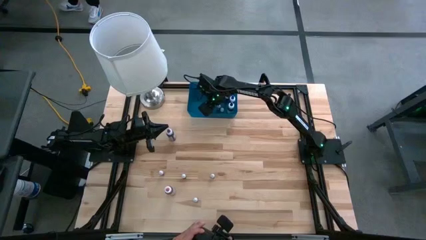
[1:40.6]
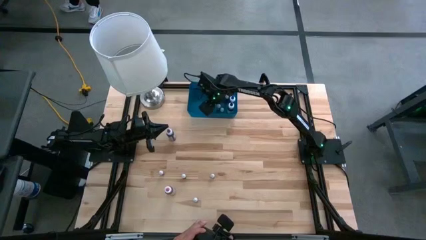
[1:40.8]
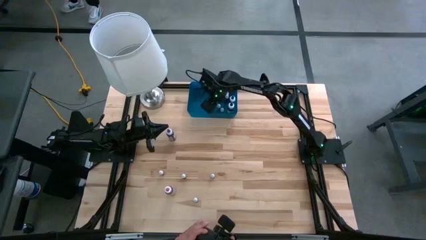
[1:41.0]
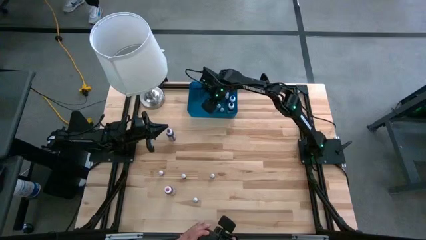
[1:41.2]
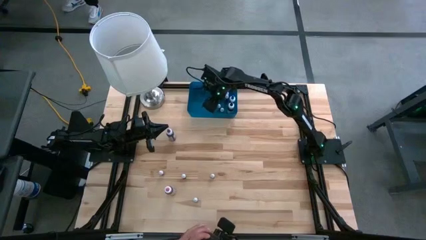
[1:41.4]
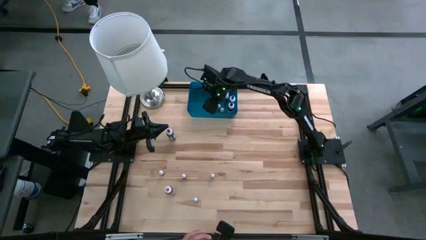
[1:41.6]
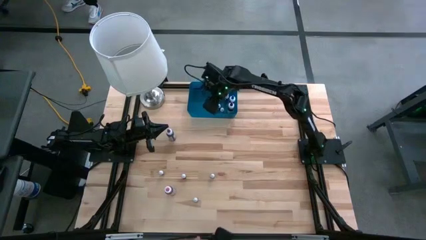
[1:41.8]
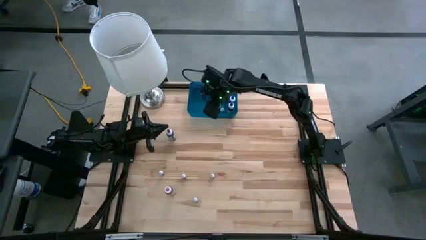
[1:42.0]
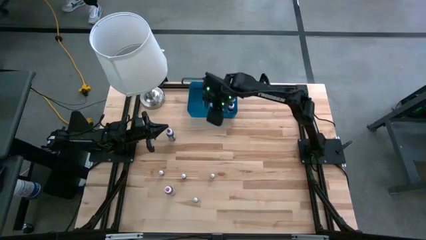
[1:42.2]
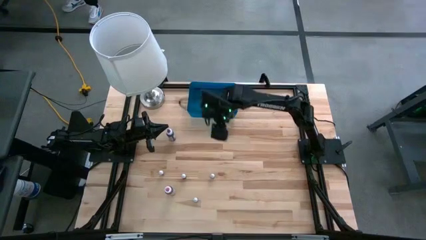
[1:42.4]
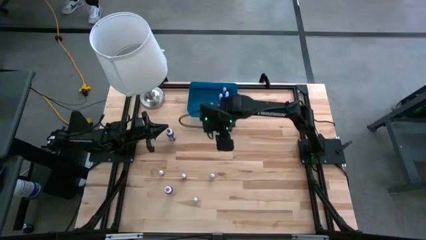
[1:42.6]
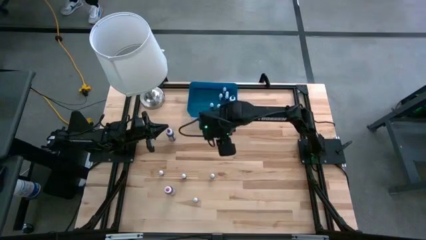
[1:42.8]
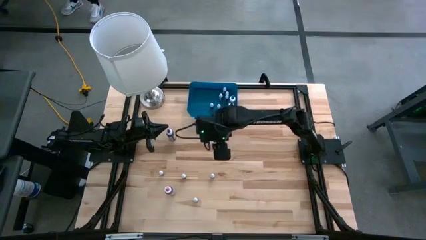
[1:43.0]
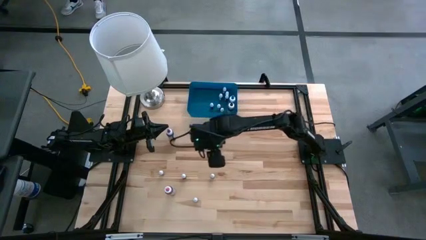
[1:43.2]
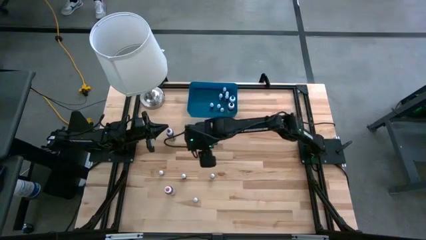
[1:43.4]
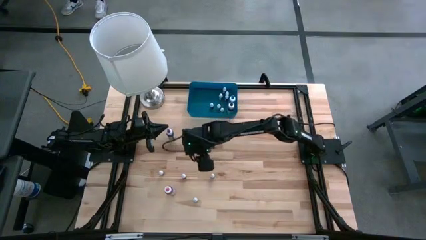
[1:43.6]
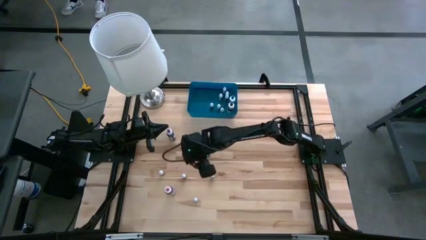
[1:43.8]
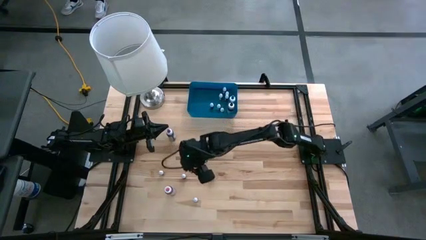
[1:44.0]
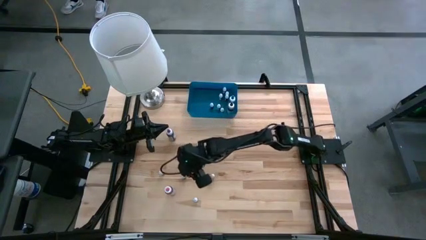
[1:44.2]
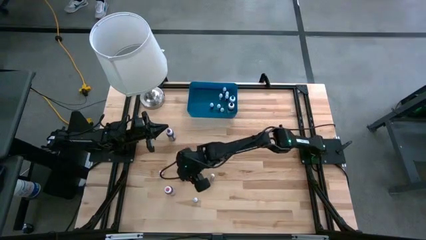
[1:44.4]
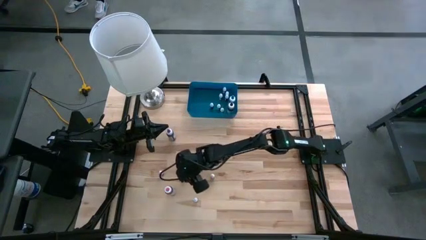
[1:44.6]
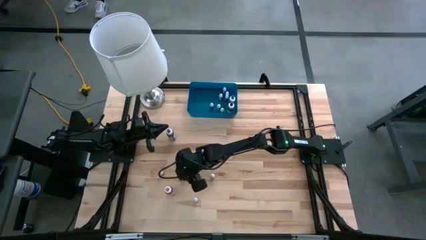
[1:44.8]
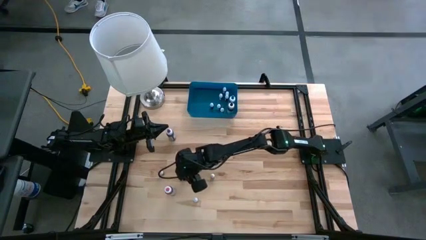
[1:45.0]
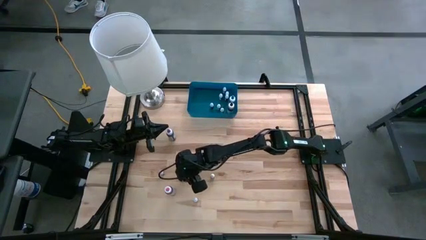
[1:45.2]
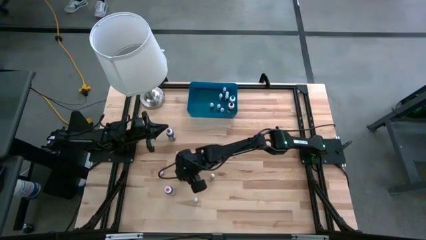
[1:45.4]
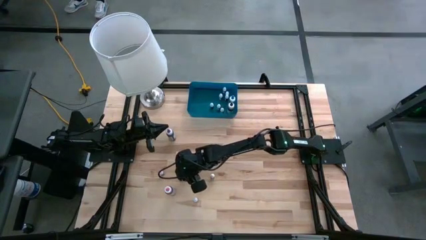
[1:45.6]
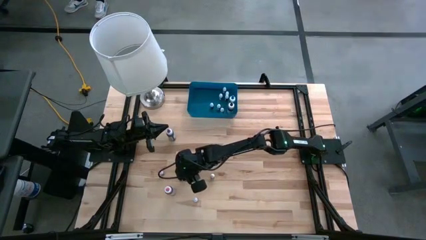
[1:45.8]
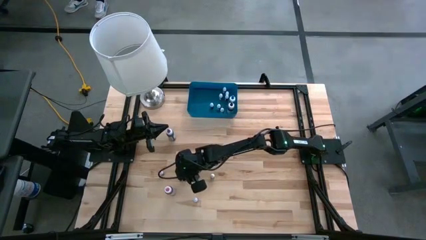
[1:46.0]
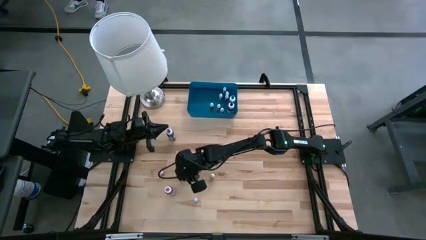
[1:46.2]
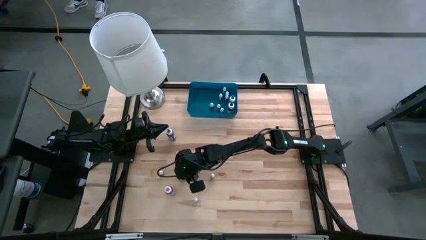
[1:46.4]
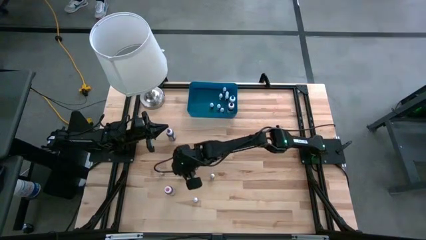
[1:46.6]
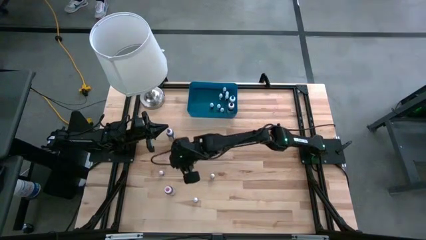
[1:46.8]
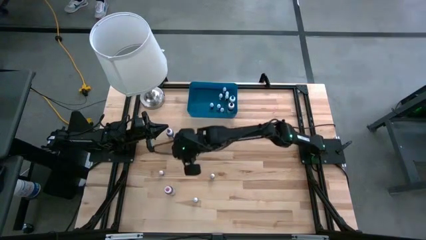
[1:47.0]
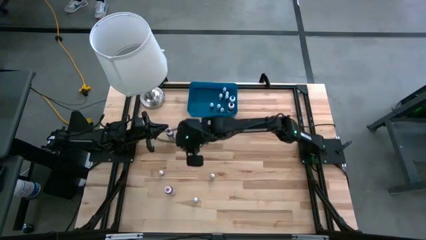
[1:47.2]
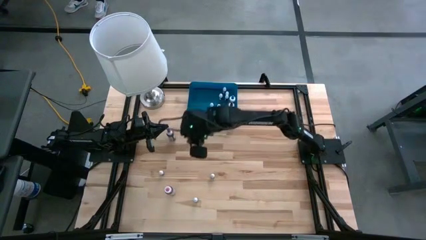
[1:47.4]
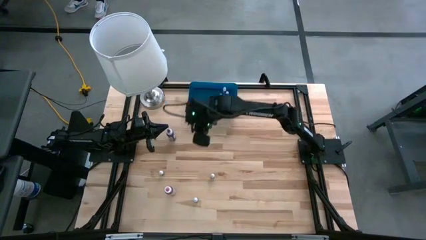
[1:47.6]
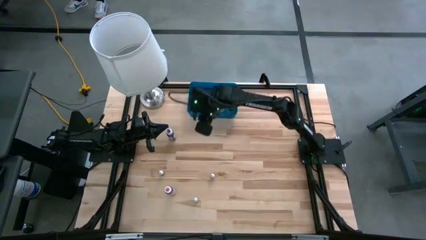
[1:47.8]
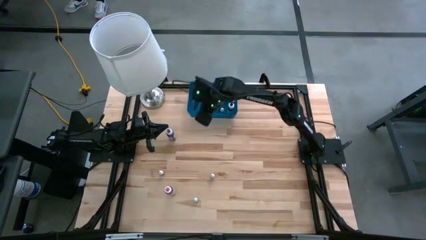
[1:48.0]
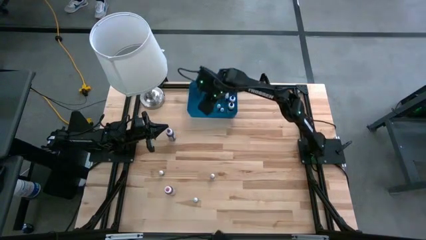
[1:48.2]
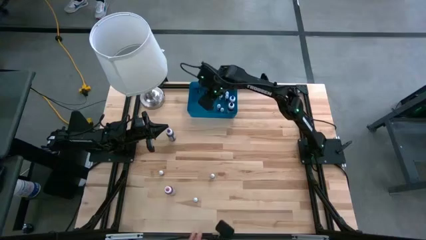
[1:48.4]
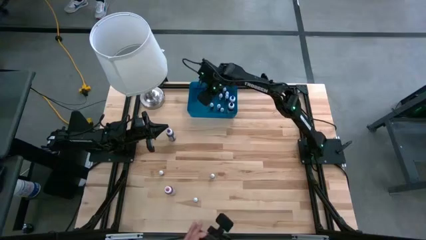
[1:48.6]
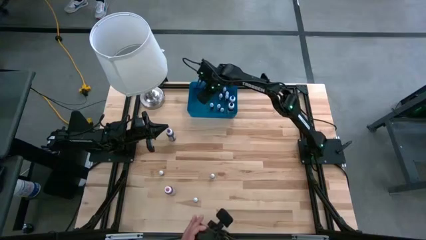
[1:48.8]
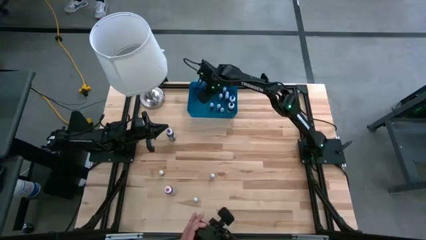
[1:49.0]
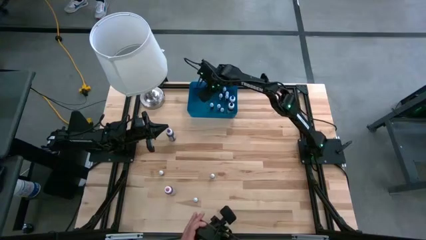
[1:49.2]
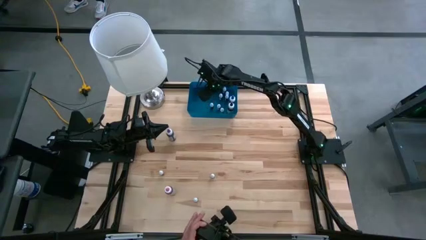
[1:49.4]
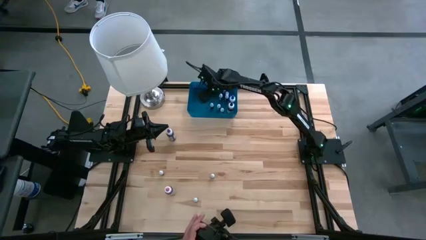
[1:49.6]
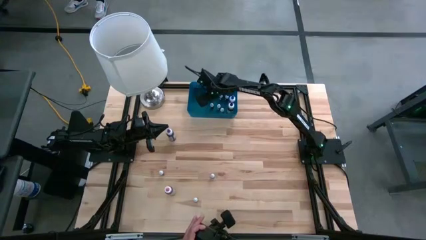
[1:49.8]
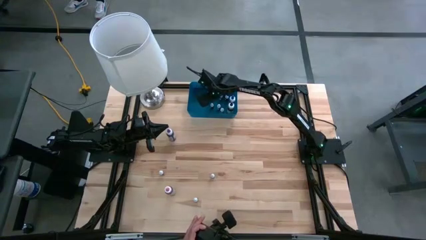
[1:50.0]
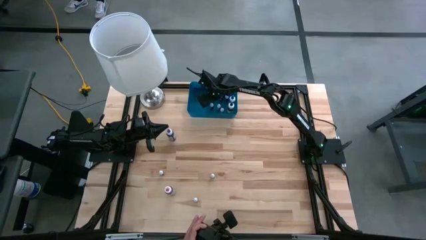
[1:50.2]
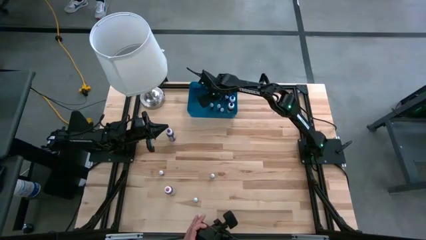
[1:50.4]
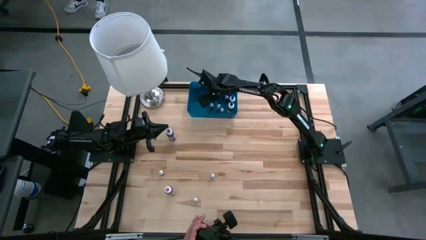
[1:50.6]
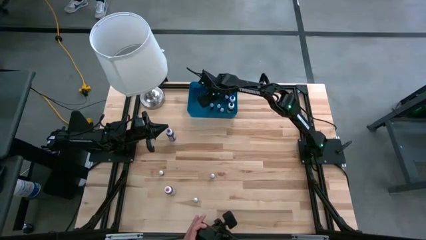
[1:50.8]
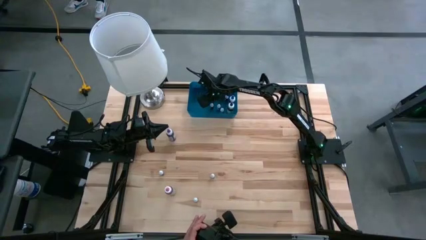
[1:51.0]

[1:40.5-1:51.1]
Task: Pick & Place food coloring
Put the small green food coloring bottle into the blue bin

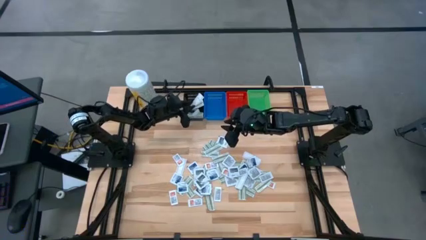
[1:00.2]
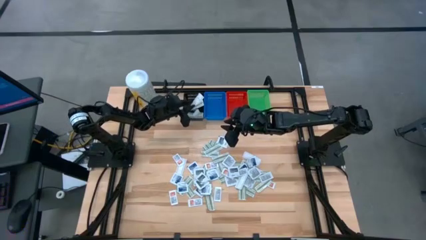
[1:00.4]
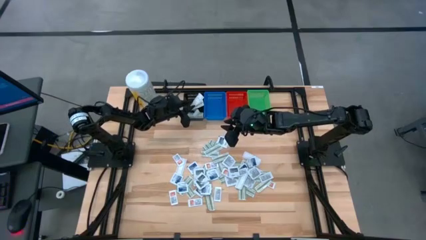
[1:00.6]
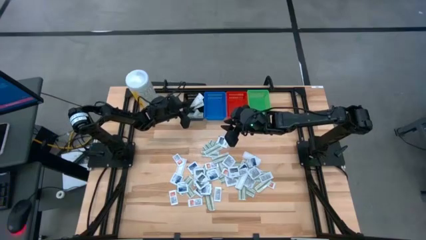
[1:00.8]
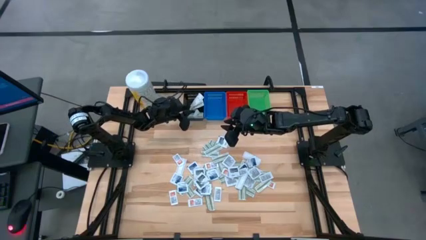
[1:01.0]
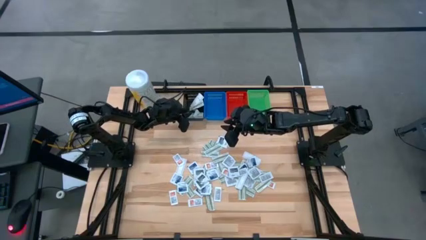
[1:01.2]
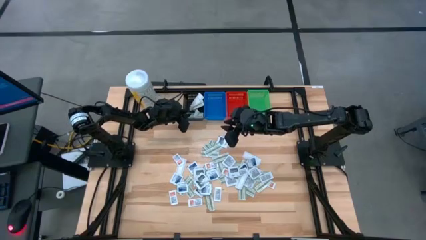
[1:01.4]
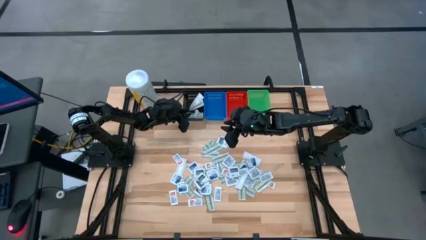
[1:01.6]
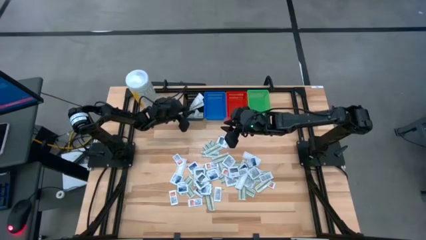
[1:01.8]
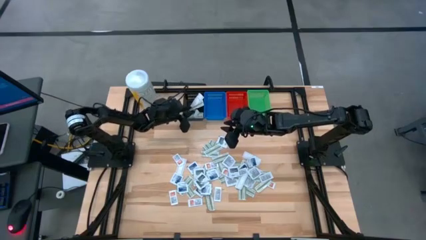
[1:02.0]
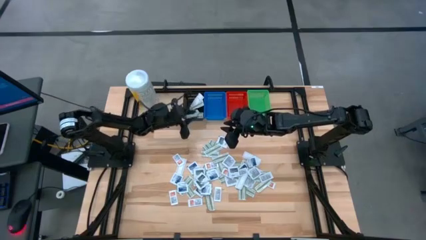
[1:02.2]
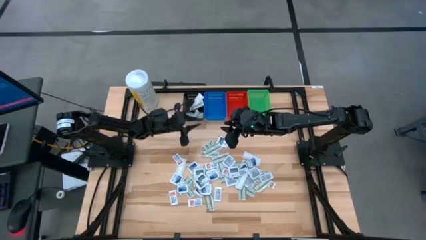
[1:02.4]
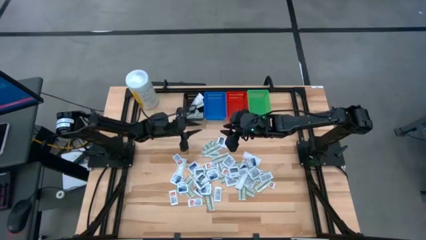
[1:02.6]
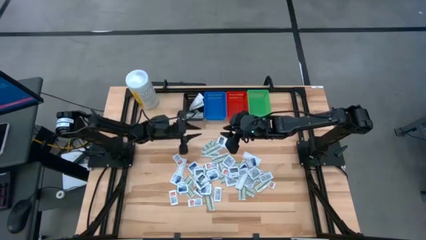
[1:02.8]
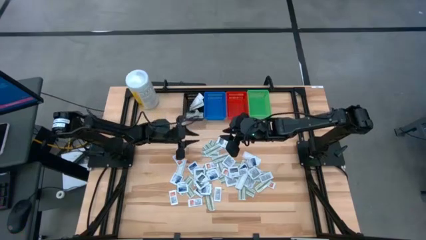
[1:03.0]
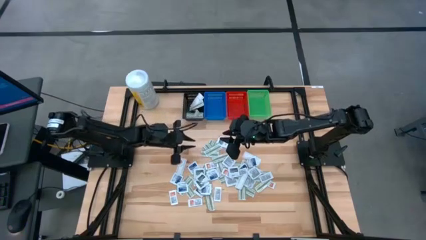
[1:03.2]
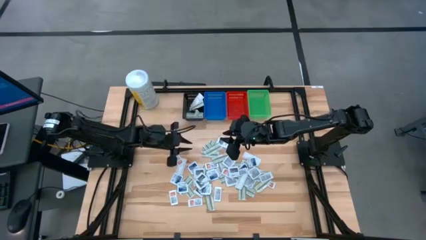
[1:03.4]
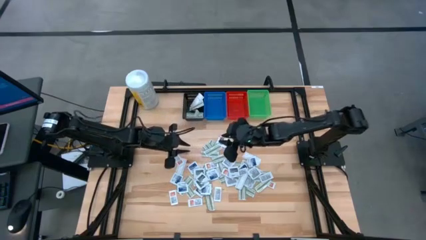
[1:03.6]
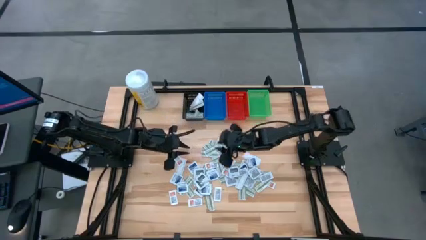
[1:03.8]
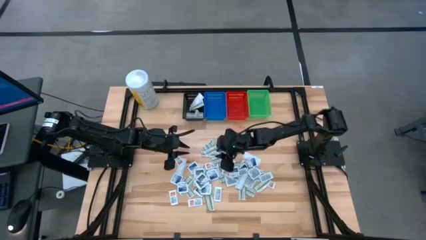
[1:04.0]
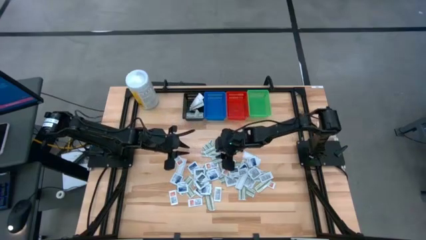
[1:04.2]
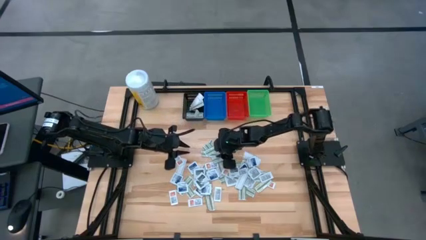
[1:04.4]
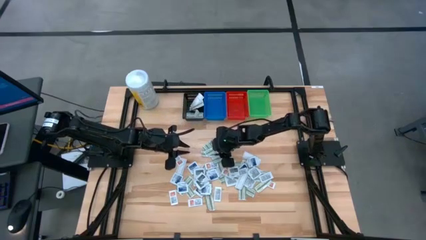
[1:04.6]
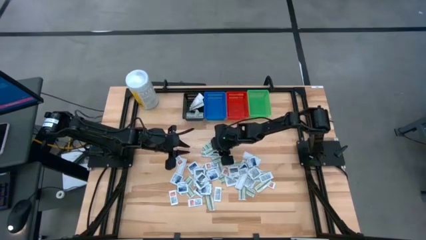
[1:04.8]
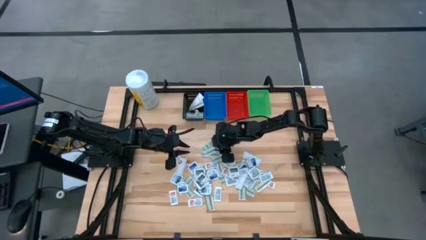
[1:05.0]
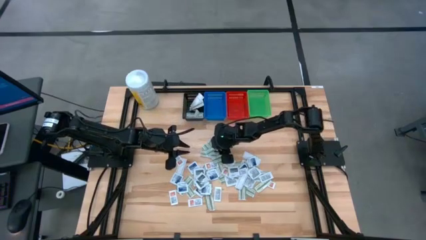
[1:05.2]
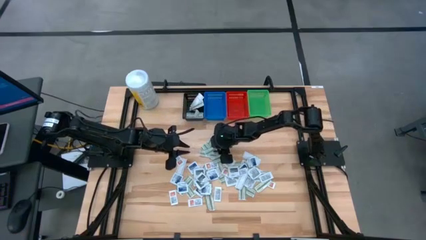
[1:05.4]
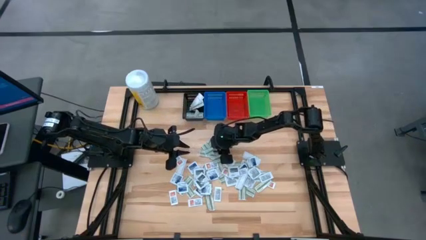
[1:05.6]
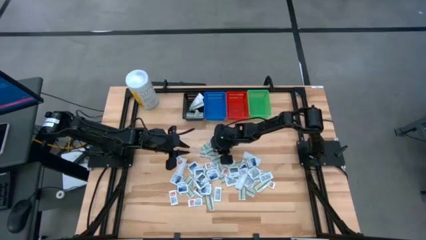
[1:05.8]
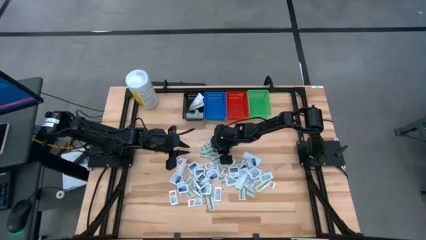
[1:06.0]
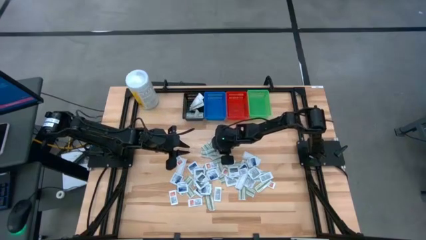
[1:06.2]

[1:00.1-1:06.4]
Task: Pick & Place First Aid Supplies
Put the green bandage pack in the black bin
